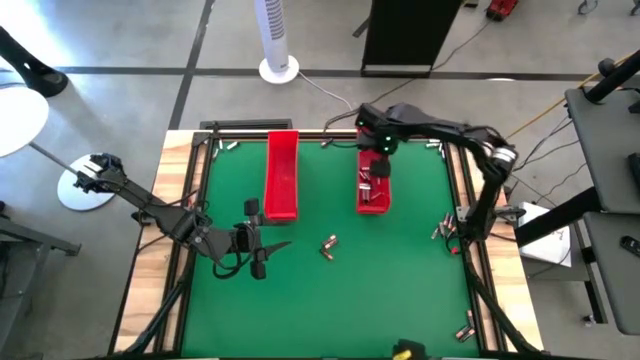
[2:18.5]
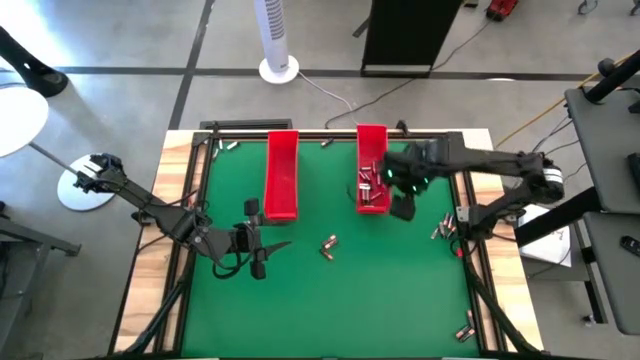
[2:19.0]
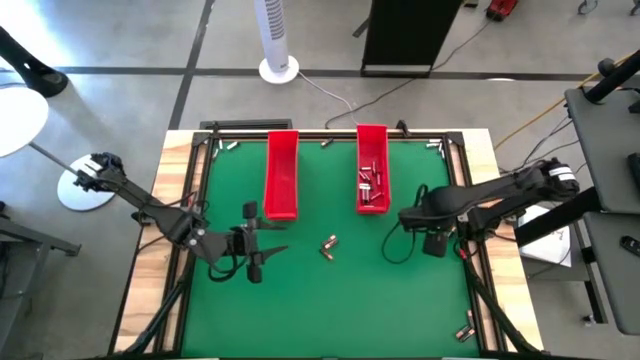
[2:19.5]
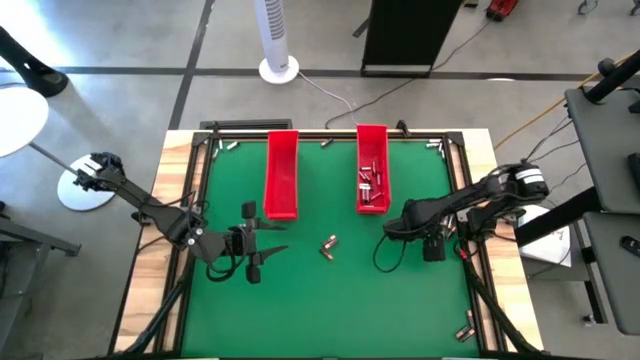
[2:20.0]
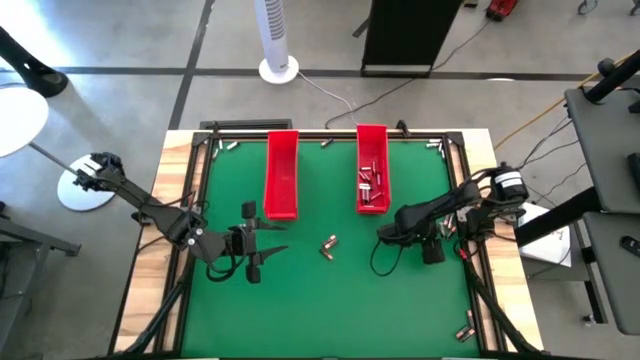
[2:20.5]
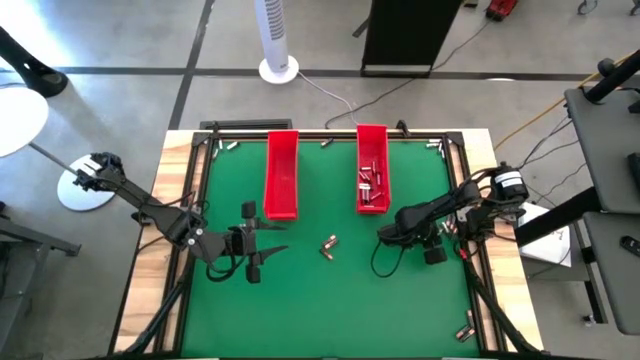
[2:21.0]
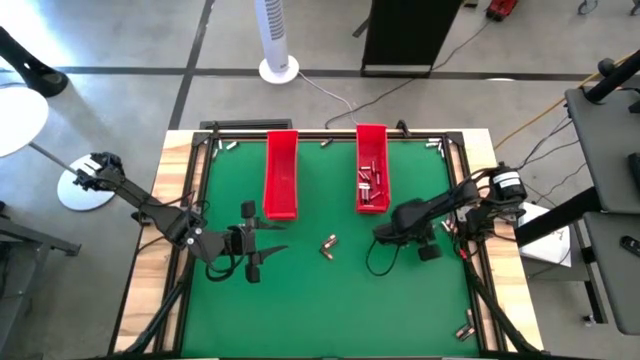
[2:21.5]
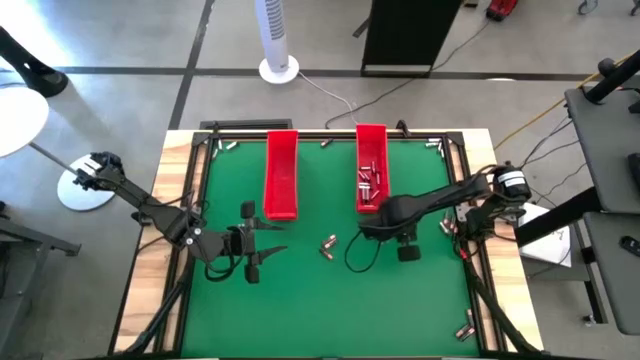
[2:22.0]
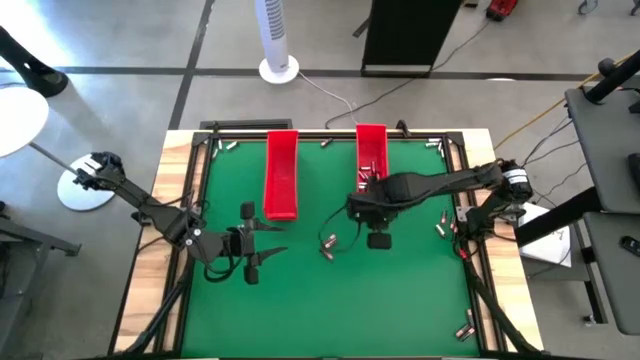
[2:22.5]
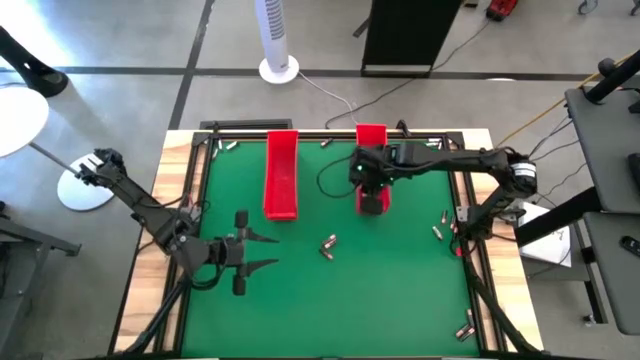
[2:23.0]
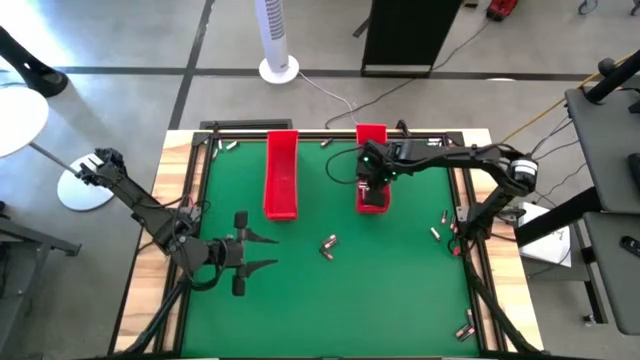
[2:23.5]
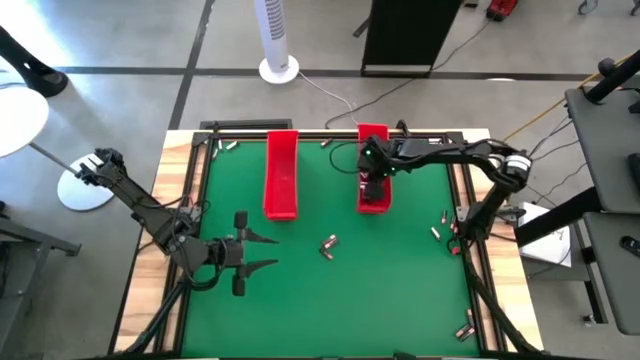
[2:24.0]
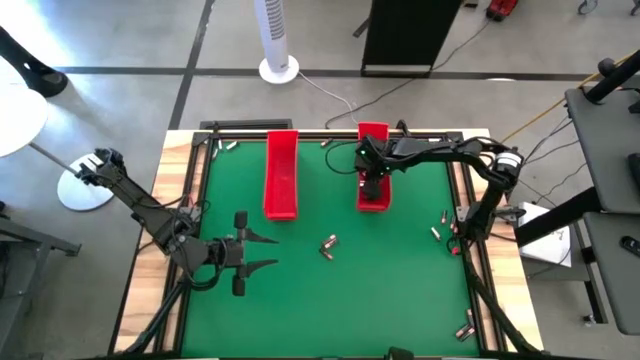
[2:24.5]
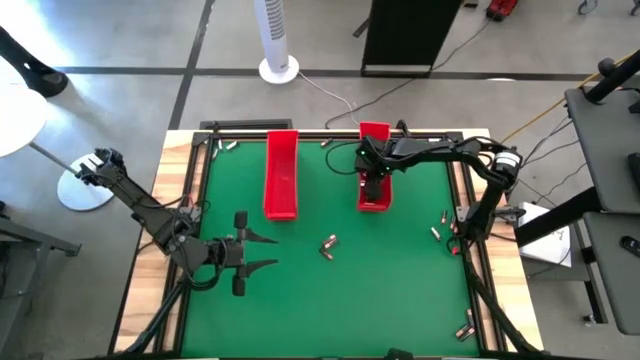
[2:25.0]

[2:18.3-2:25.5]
Task: Sort batteries
Put the silver battery into the right red bin

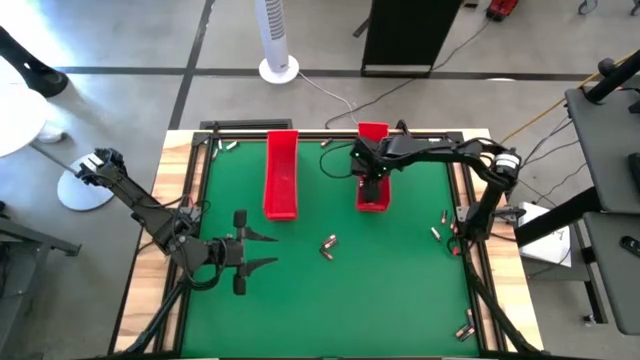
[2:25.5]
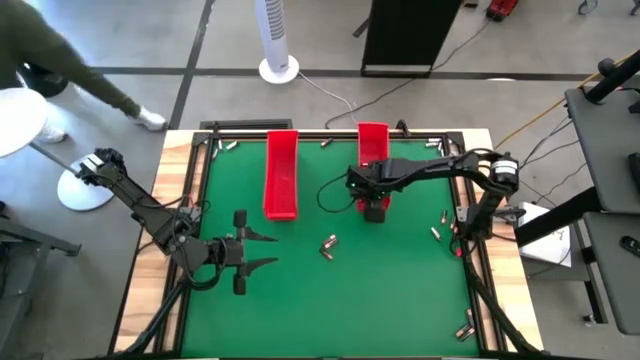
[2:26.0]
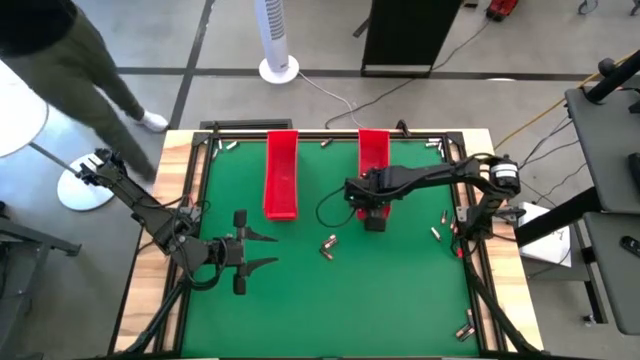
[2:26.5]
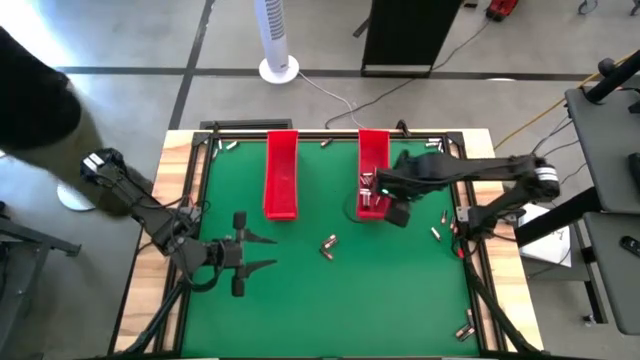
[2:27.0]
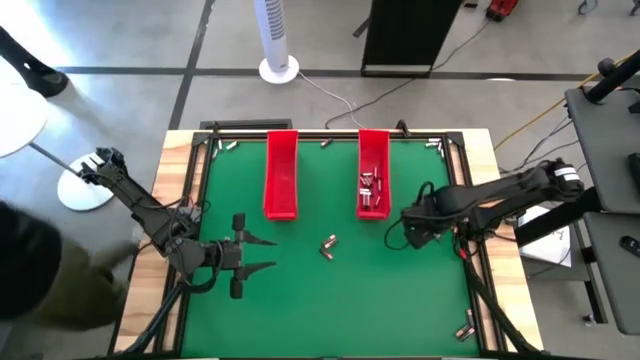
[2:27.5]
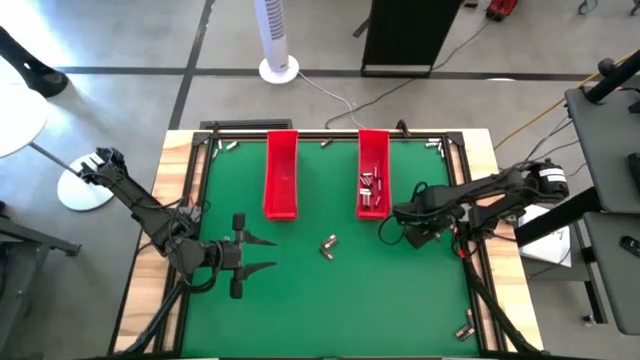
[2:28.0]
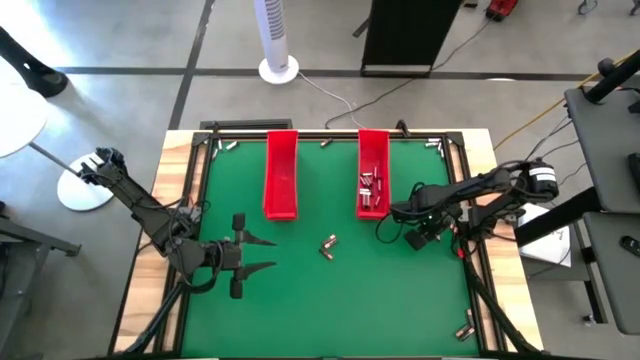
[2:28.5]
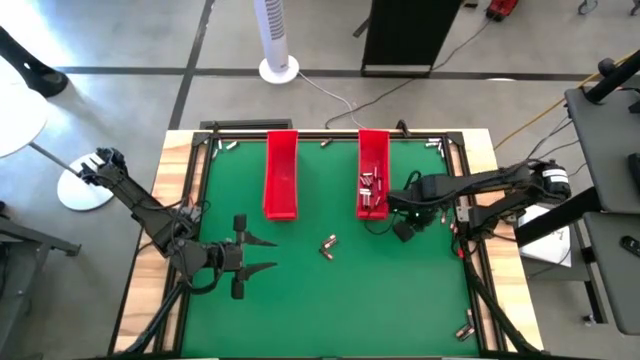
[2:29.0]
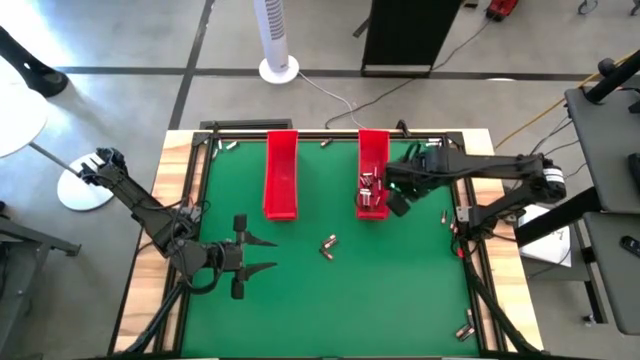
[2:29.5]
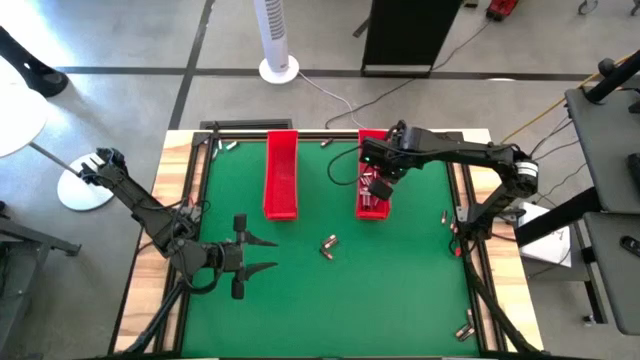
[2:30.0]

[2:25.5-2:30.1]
Put the silver battery into the right red bin

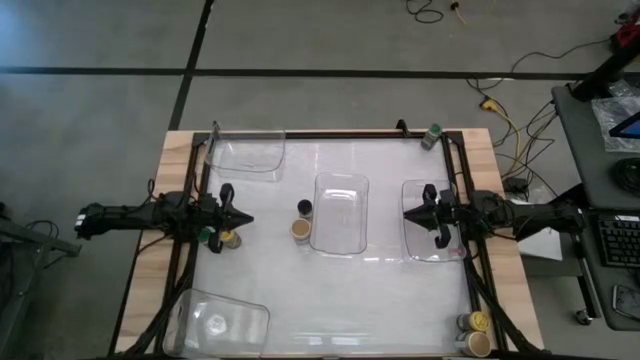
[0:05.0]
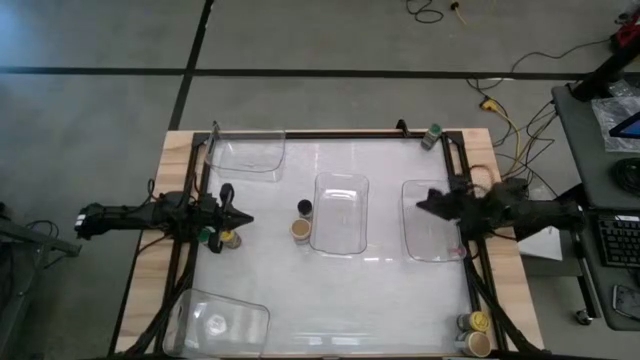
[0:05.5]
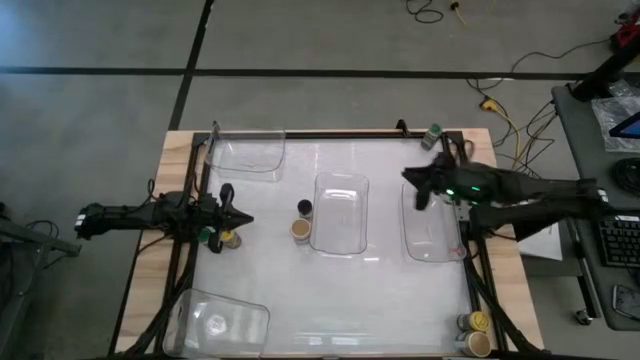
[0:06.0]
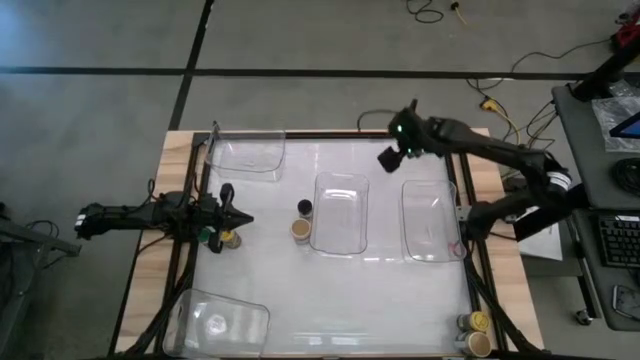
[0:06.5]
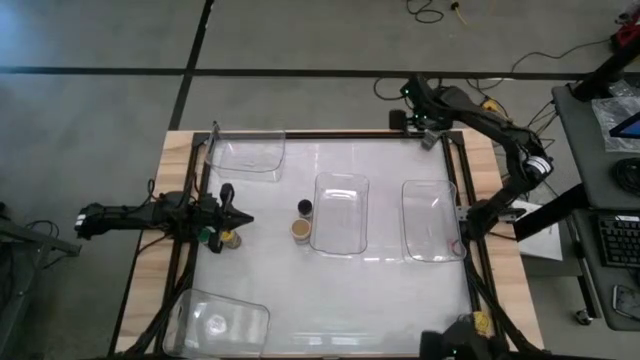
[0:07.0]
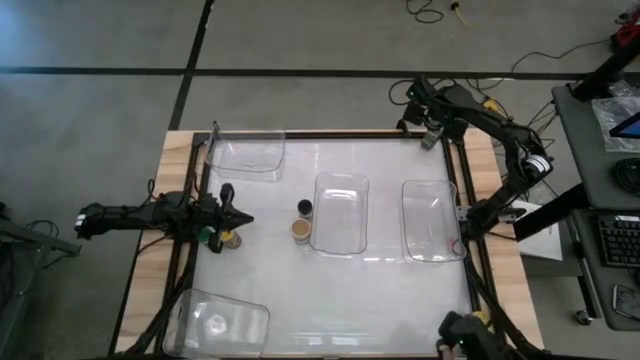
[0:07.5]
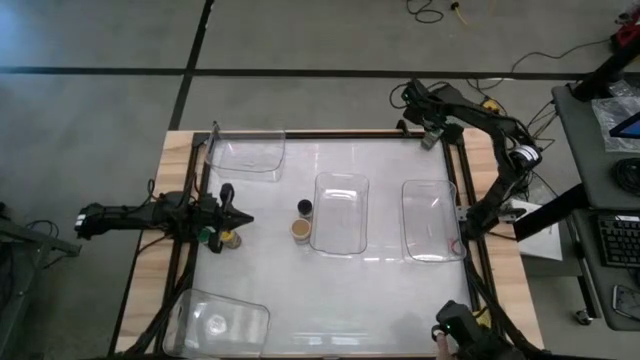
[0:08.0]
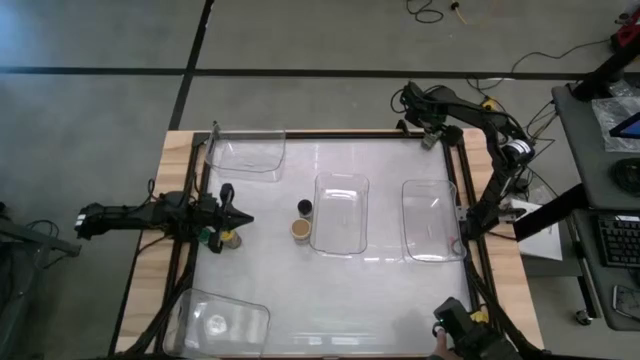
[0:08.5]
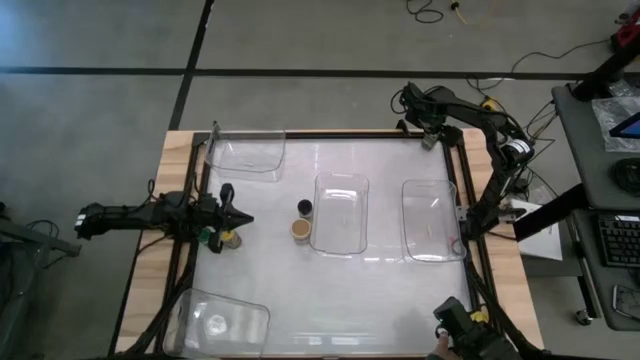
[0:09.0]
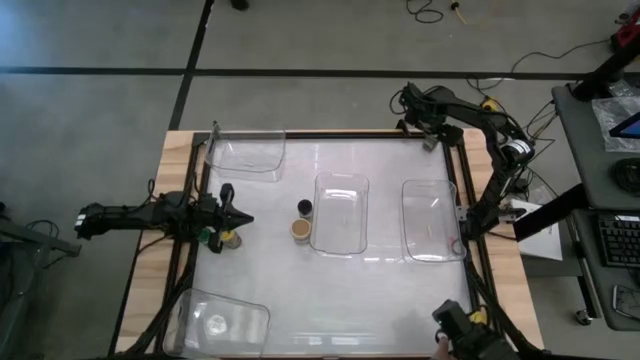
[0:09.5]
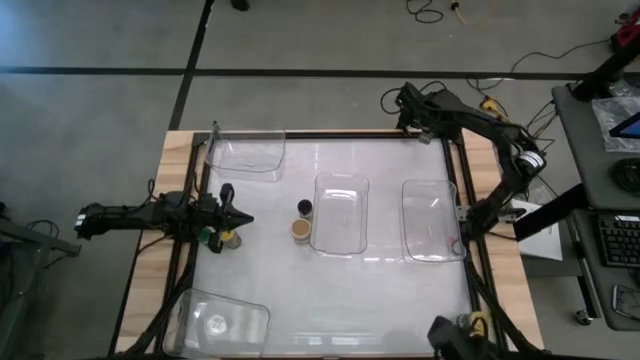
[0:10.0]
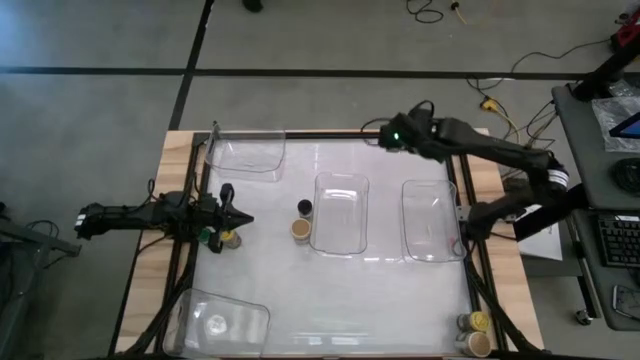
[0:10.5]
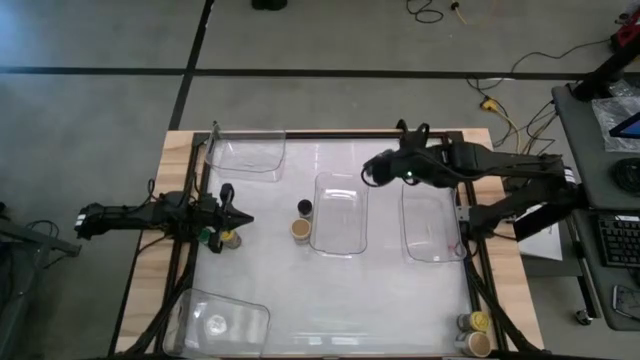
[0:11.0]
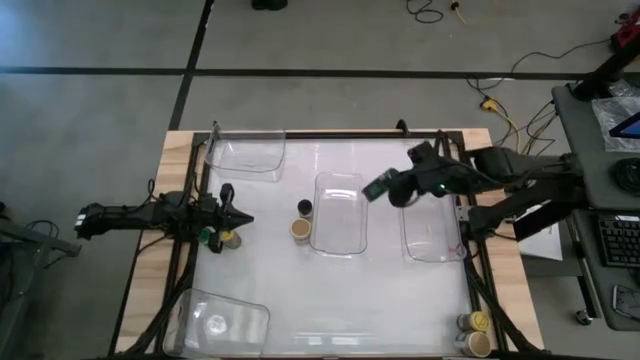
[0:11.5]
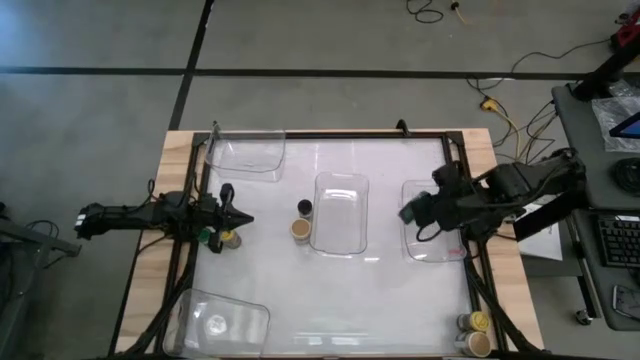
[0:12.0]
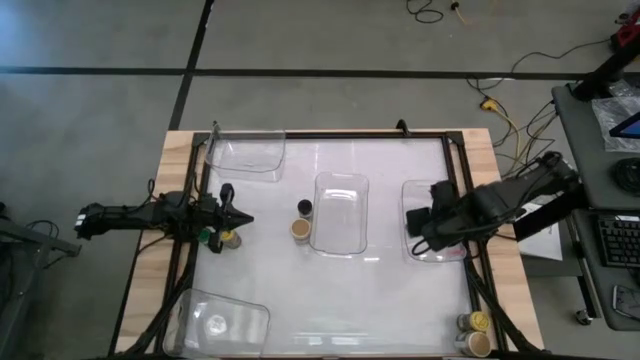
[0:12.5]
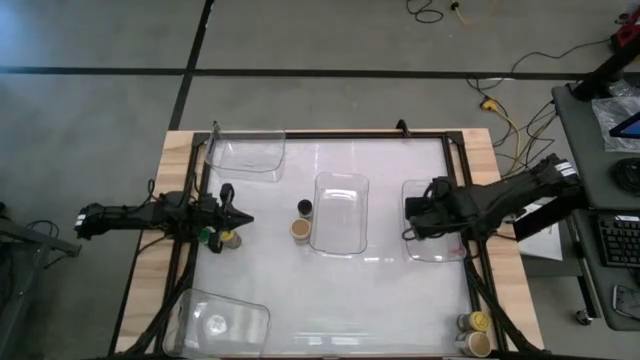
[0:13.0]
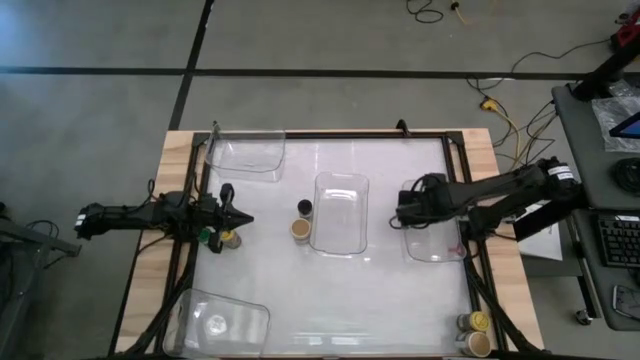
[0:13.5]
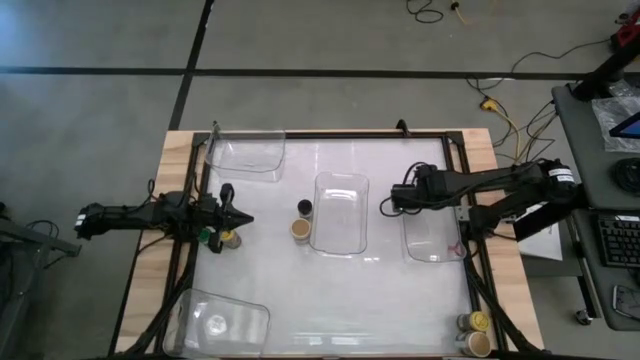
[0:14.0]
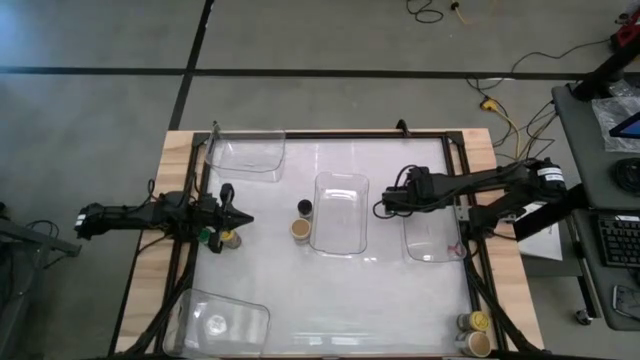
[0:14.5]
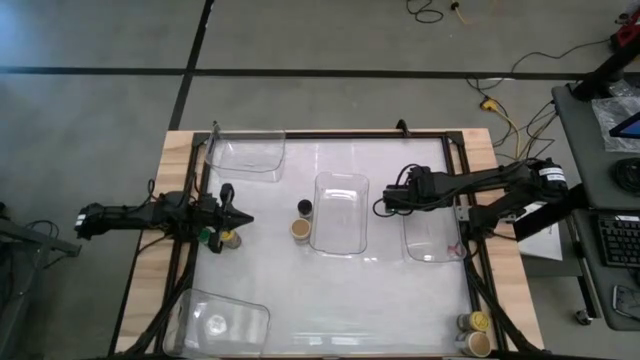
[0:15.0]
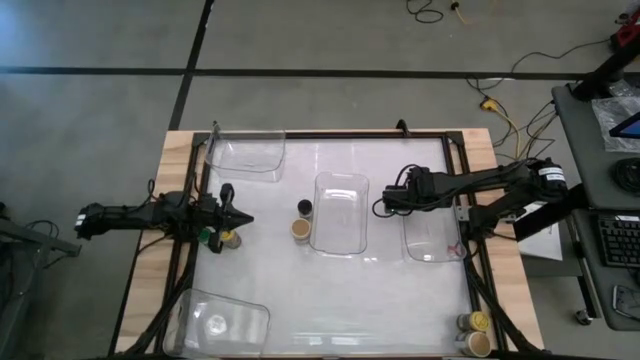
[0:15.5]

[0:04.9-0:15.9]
Task: Sort spices by type
Put the top green seasoning bottle into the middle right transparent bin
